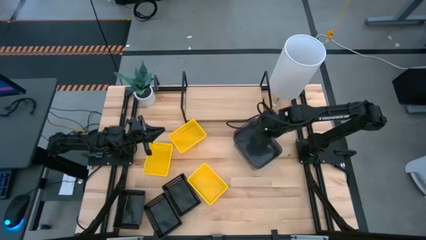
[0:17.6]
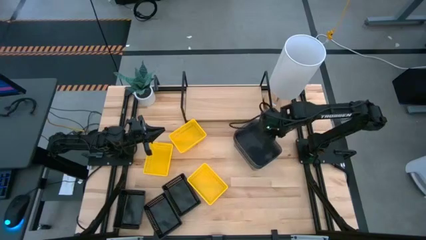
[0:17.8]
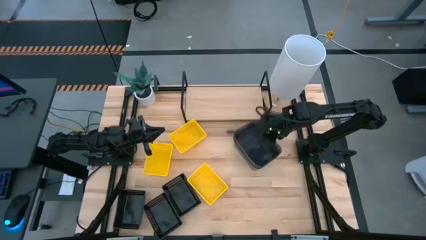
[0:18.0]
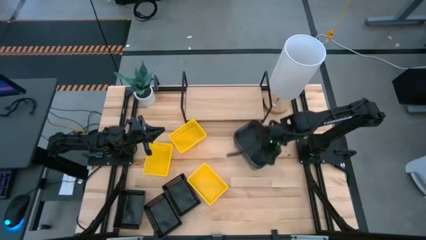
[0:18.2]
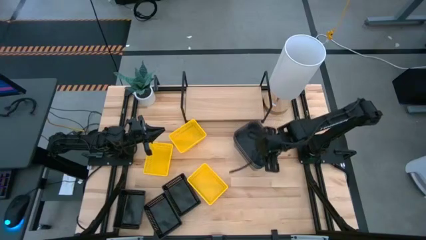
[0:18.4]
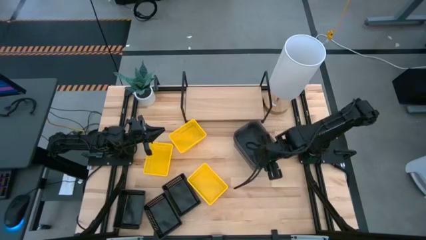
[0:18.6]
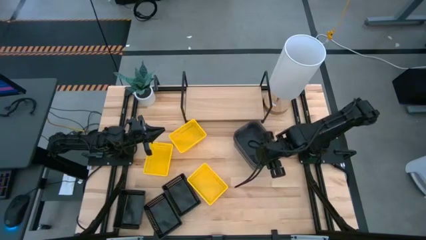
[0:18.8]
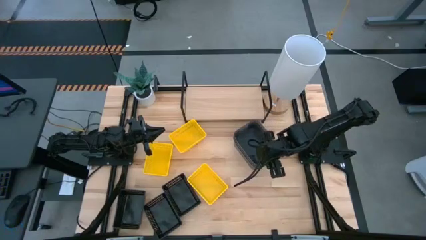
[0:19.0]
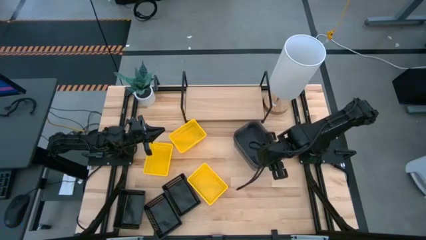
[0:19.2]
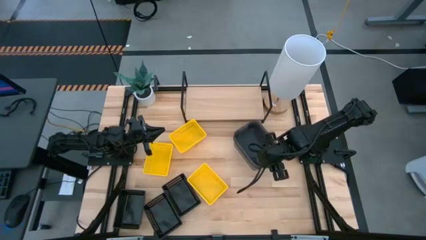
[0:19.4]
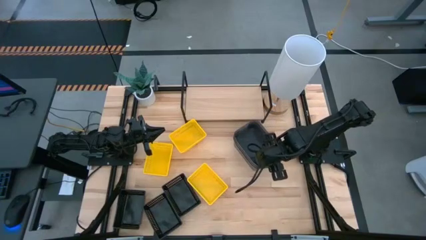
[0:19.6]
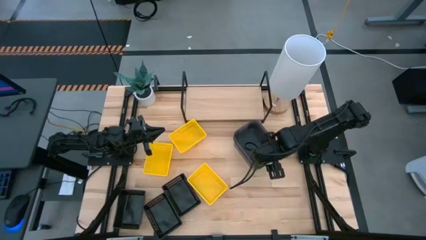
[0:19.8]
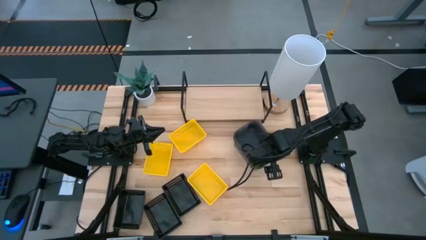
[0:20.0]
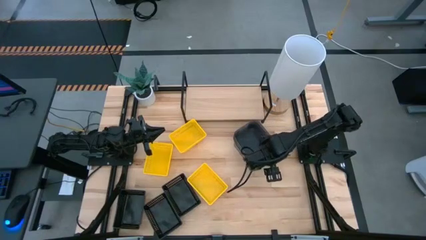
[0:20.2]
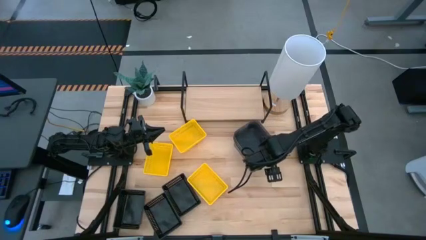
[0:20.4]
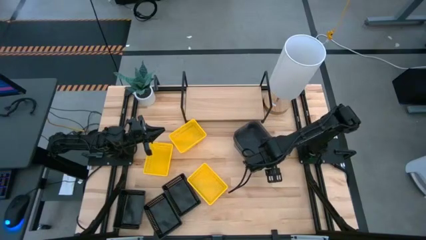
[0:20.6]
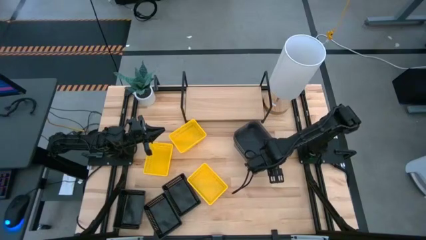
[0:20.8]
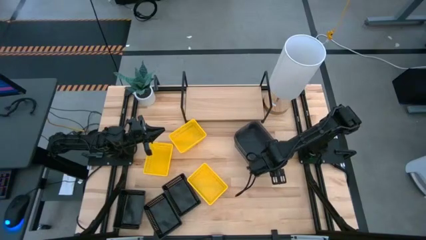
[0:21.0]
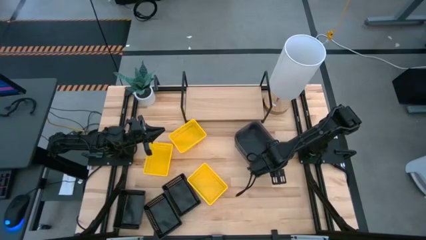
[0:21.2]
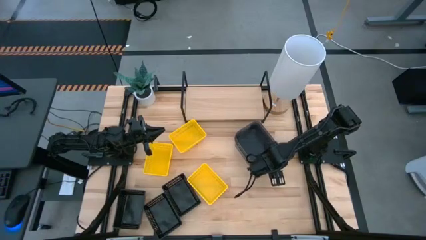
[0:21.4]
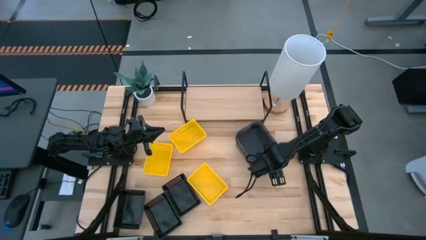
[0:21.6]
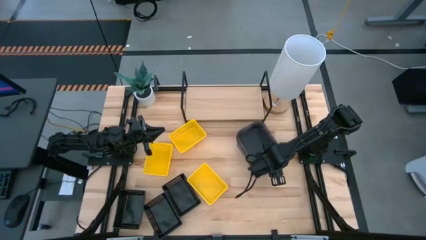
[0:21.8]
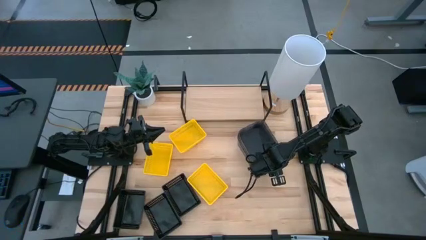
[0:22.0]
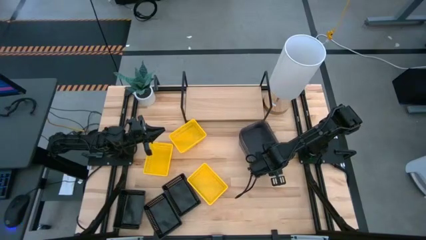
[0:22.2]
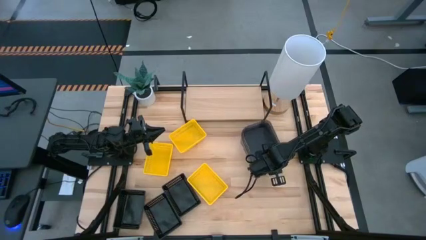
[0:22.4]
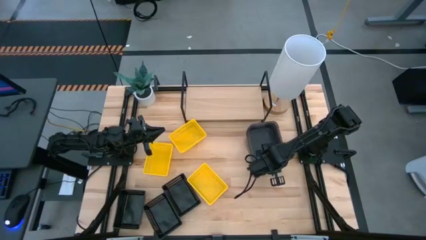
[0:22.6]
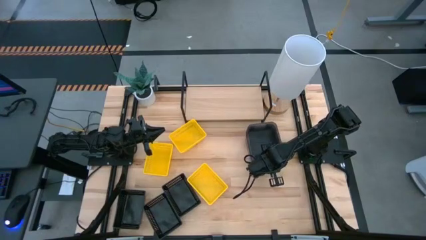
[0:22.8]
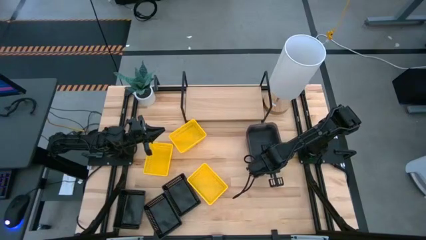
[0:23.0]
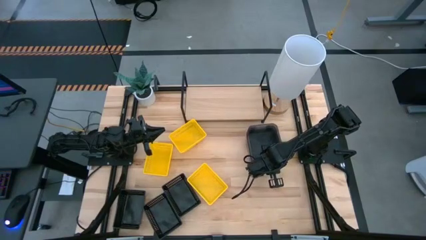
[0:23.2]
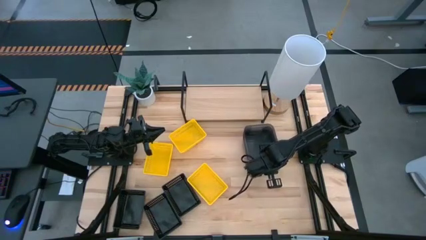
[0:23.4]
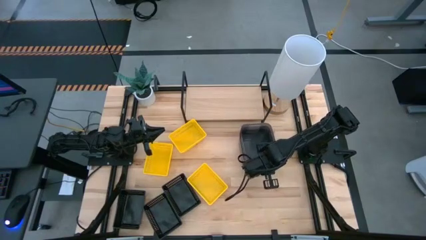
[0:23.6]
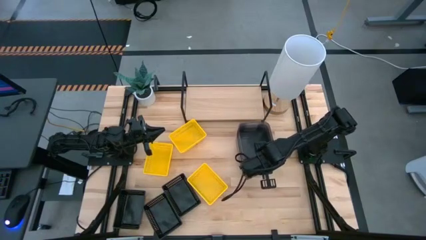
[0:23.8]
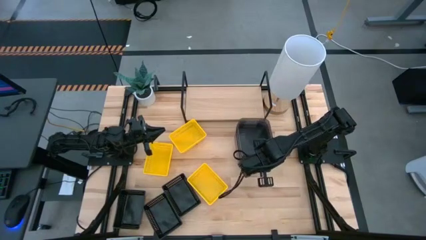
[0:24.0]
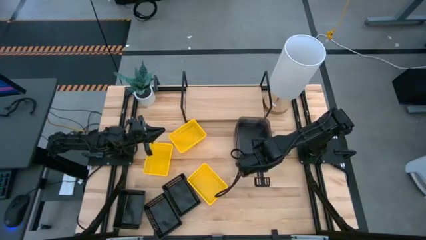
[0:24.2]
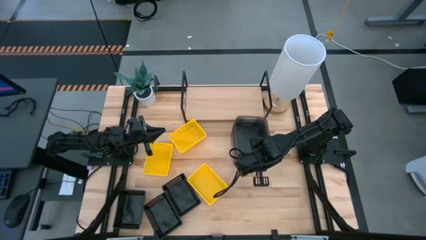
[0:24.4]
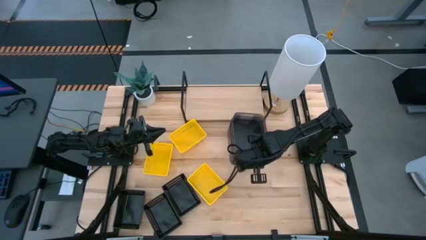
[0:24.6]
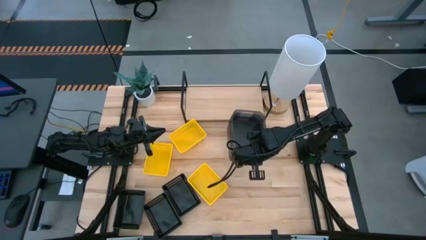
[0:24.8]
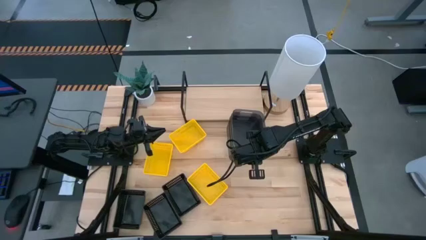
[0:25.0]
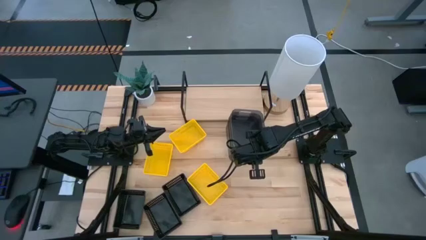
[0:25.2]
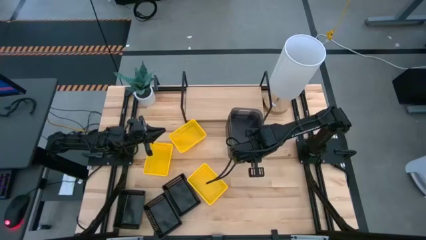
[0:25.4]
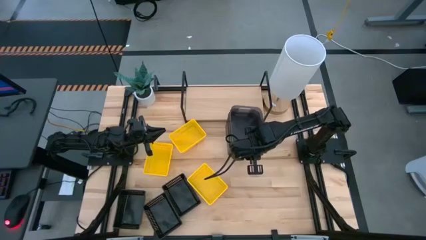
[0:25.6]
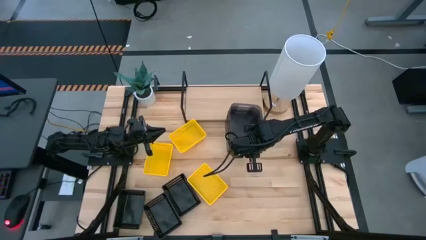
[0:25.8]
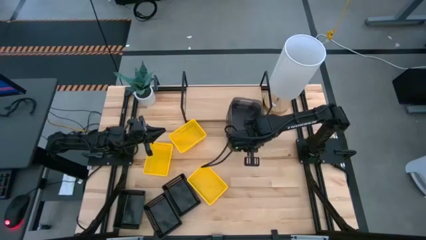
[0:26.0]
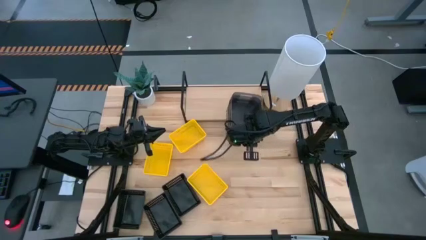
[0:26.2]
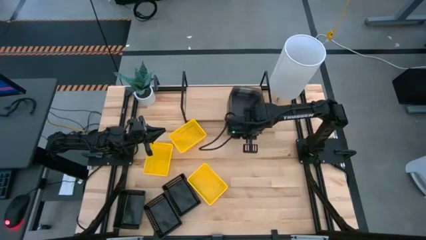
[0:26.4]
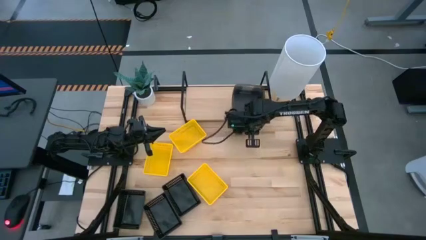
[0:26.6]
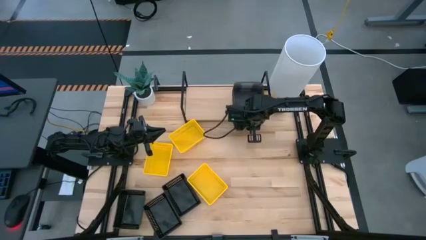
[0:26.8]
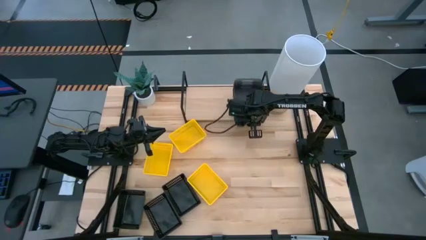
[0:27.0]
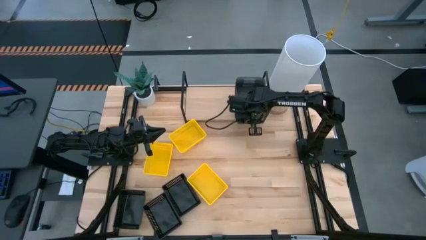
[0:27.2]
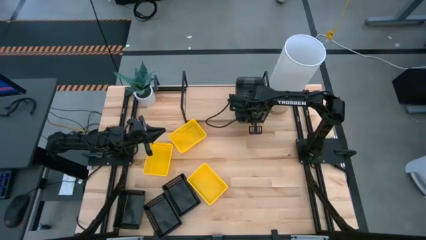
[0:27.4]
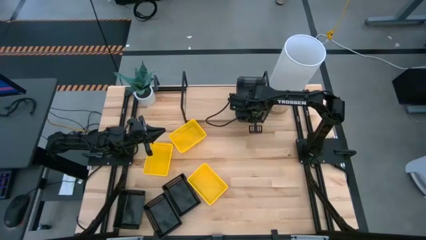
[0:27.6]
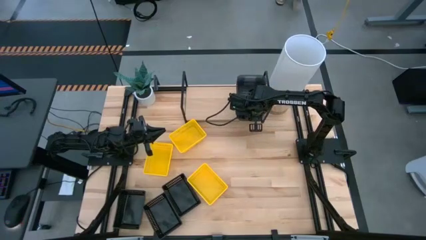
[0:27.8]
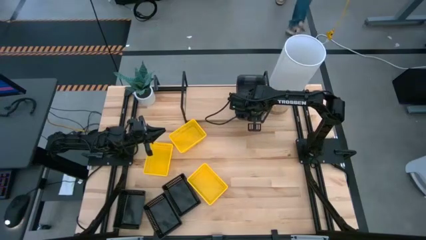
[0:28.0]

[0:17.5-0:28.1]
Task: Stack baskets on shelf by color
Put the stacked gray bins on the shelf

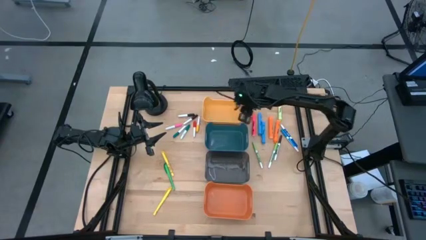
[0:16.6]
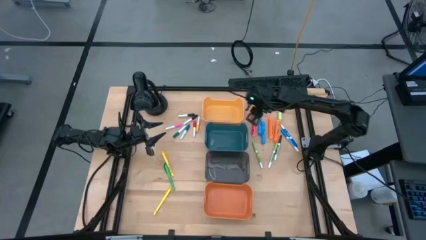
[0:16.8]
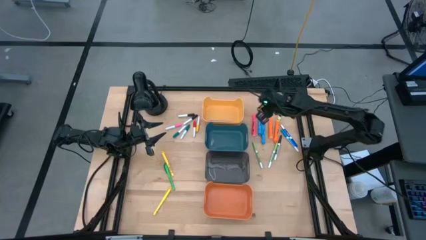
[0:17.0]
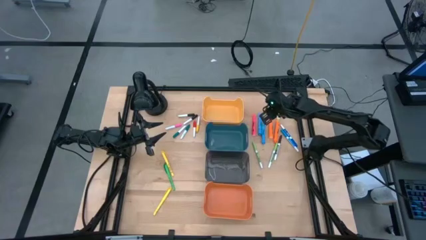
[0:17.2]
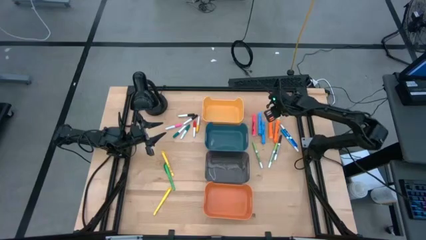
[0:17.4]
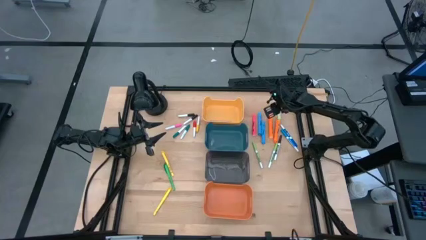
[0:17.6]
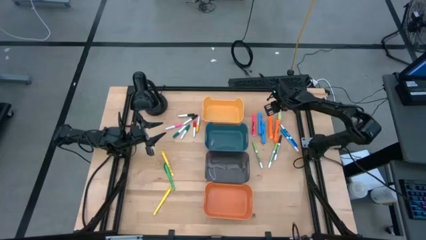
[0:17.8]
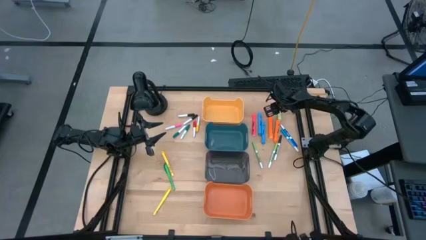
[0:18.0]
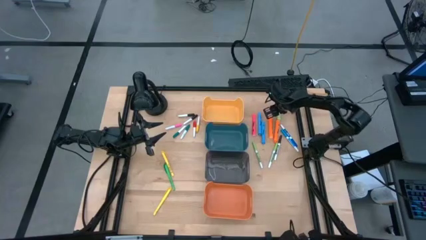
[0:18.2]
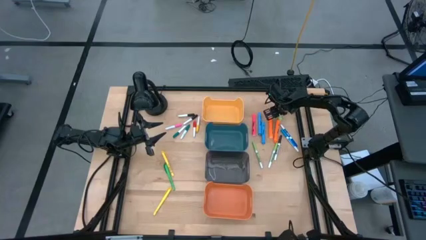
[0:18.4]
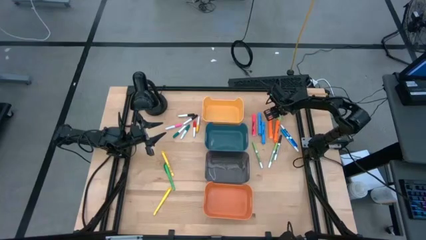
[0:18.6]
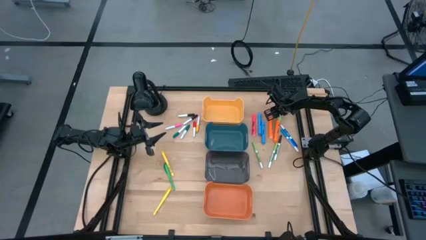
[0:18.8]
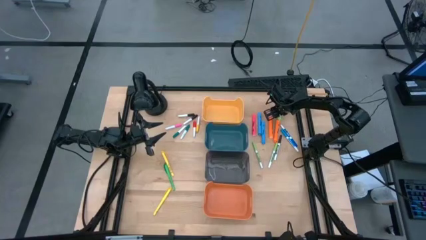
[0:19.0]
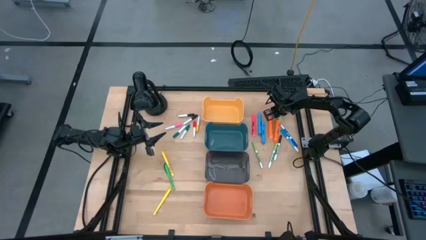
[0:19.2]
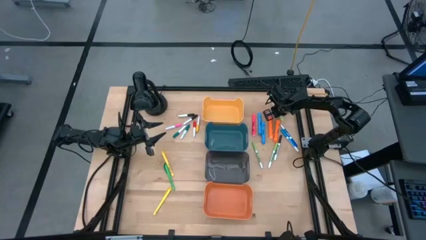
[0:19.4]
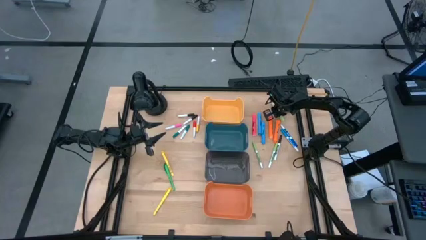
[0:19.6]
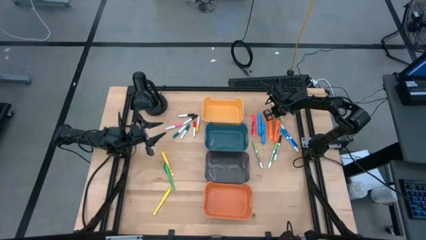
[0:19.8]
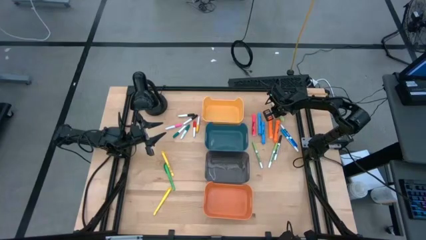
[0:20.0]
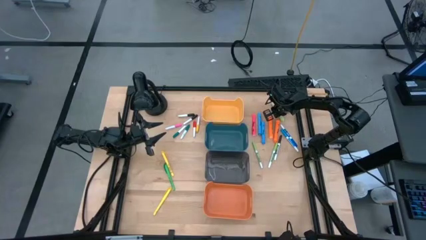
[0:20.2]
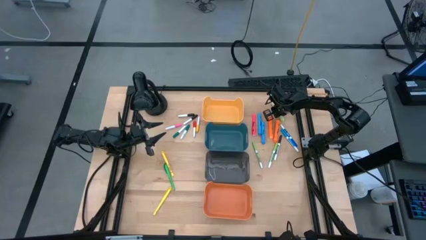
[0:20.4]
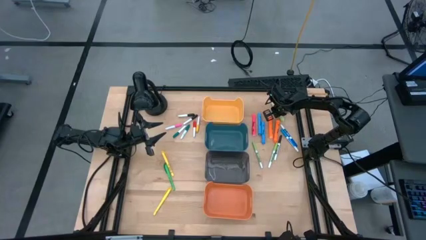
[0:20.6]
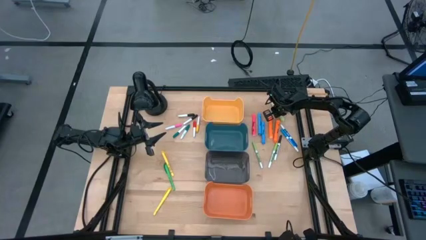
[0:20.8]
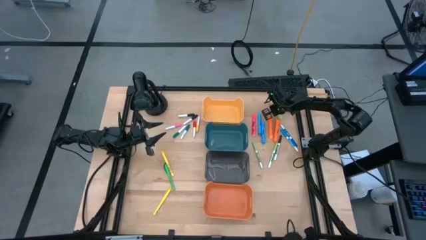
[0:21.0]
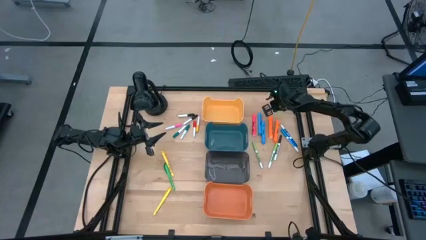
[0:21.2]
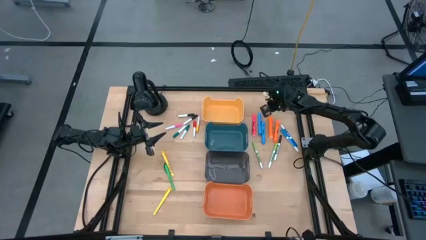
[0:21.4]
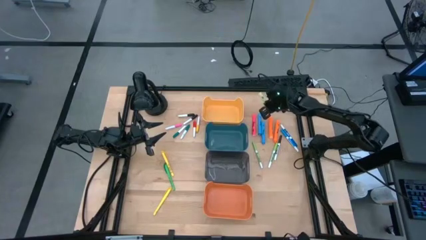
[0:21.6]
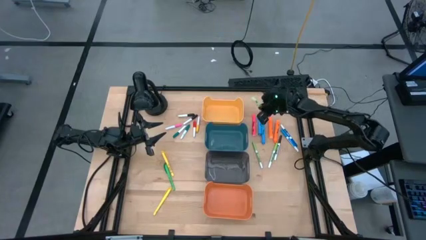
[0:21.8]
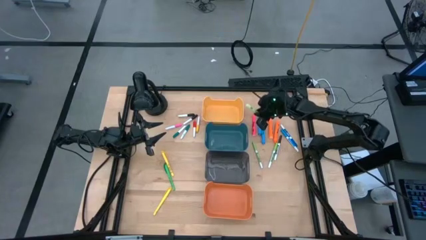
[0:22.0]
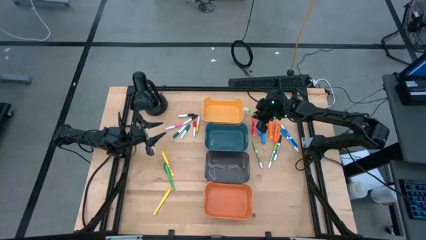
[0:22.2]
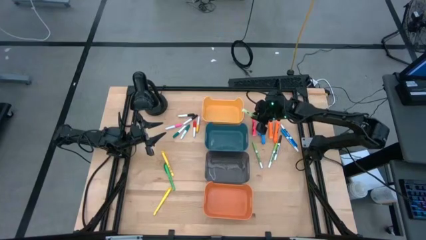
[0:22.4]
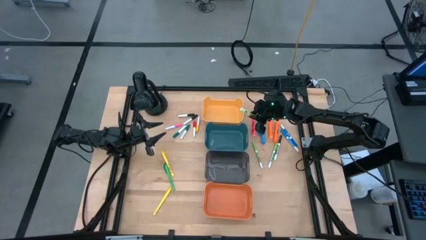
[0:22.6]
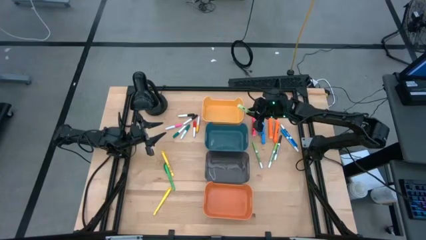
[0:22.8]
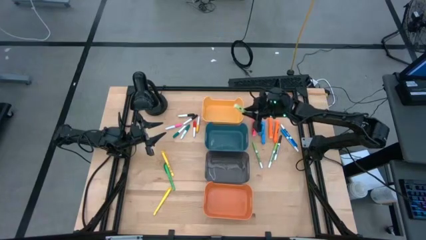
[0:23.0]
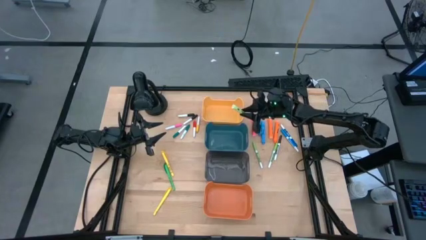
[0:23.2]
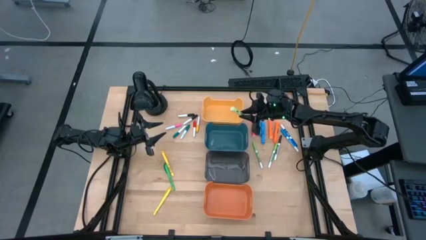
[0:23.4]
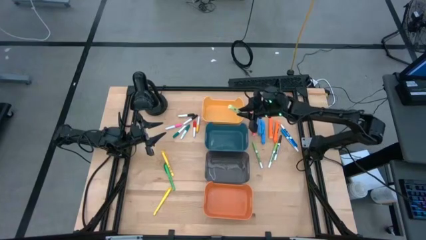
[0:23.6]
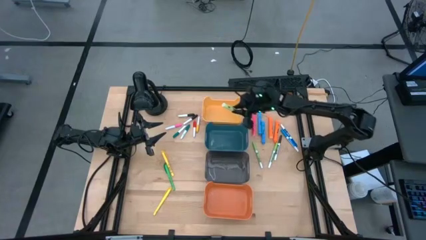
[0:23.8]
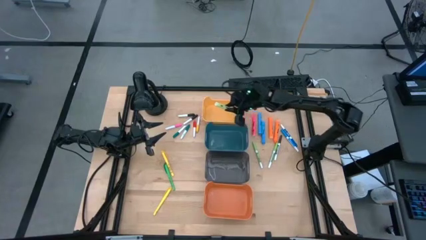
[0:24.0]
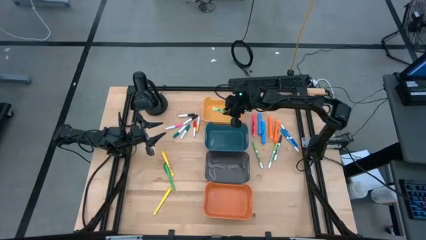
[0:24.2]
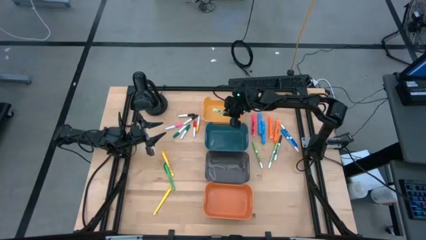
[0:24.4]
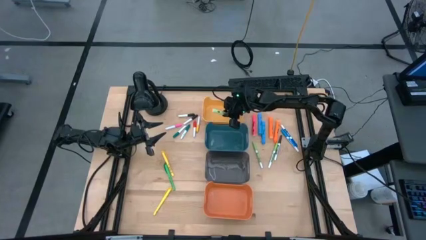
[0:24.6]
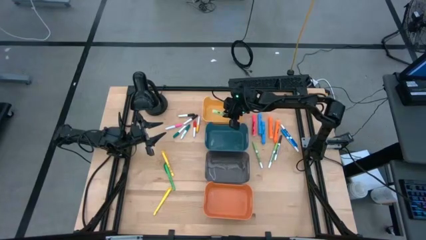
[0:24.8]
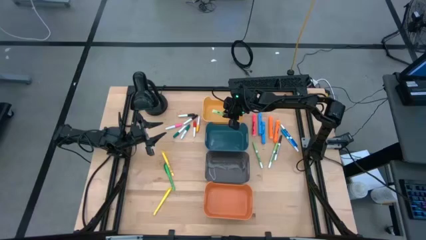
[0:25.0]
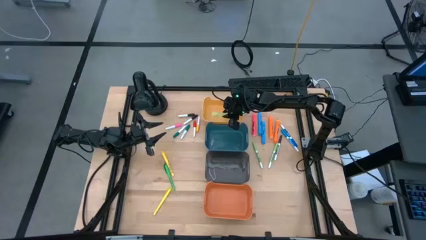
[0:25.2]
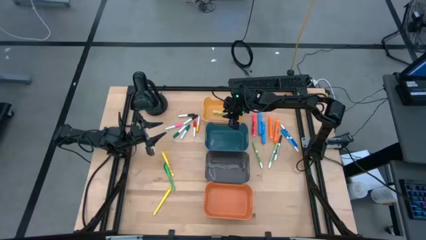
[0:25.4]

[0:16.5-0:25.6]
Task: Pick & Place Markers
Put the light green highlighter into the yellow bin
